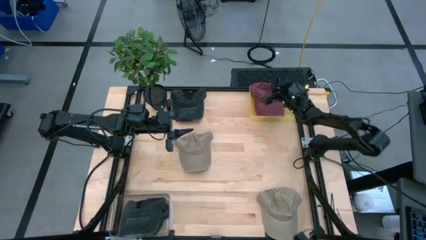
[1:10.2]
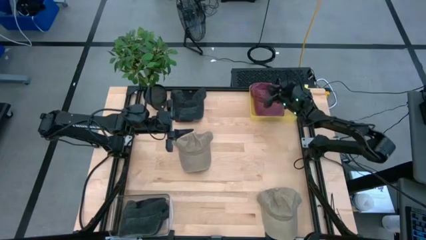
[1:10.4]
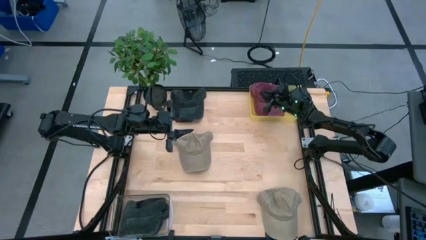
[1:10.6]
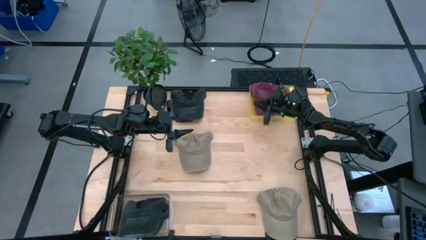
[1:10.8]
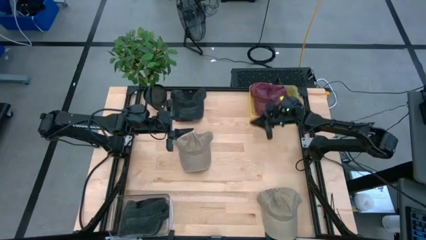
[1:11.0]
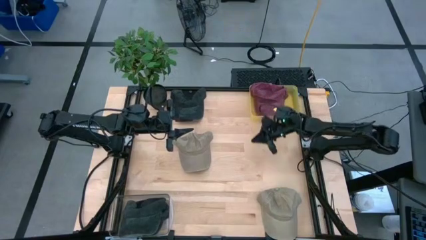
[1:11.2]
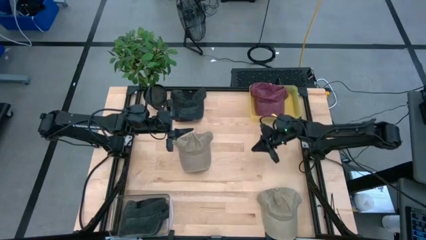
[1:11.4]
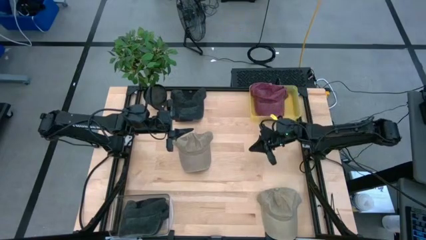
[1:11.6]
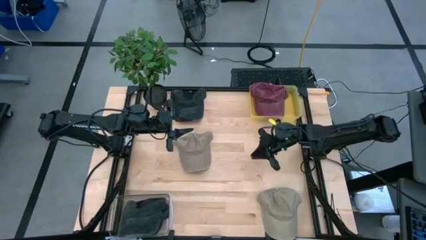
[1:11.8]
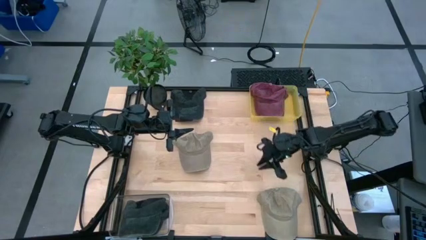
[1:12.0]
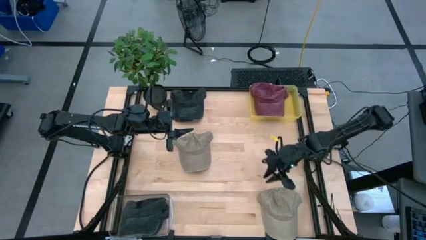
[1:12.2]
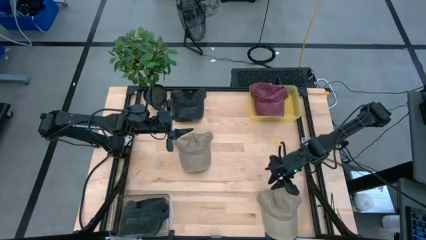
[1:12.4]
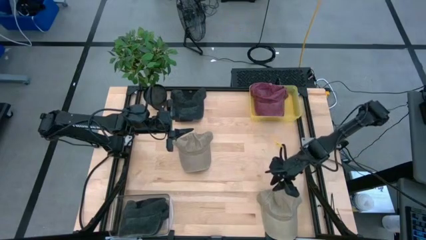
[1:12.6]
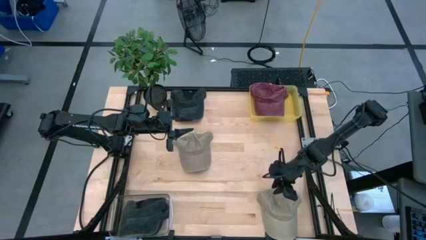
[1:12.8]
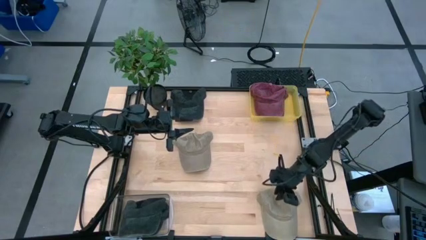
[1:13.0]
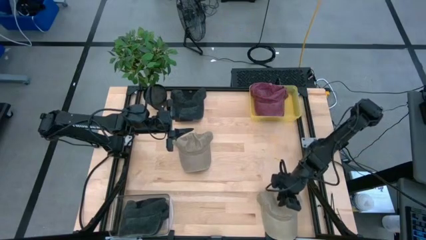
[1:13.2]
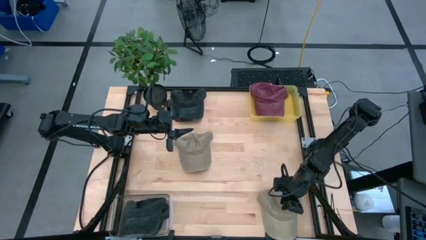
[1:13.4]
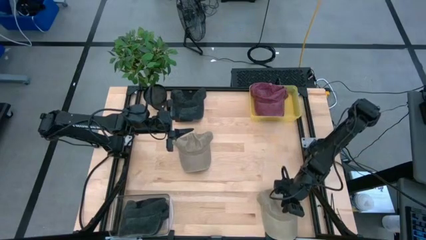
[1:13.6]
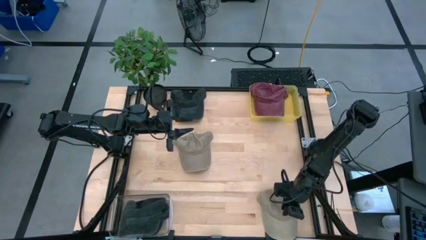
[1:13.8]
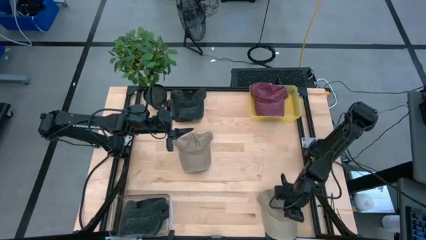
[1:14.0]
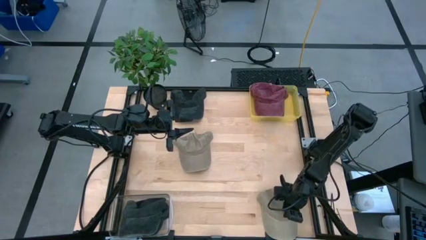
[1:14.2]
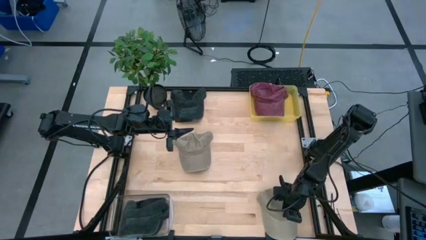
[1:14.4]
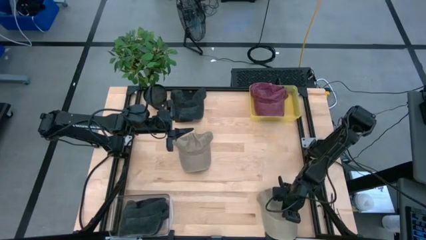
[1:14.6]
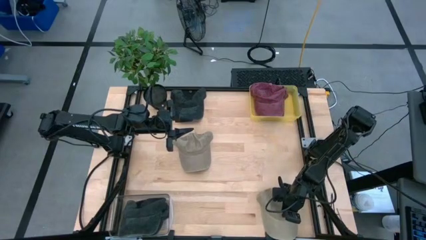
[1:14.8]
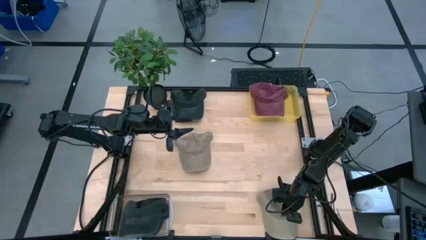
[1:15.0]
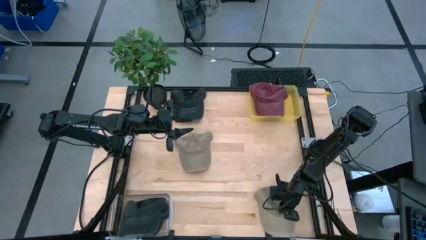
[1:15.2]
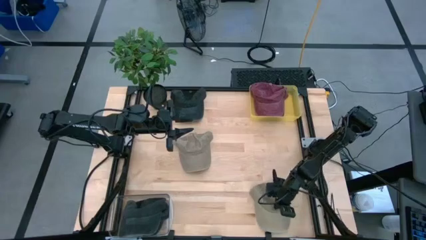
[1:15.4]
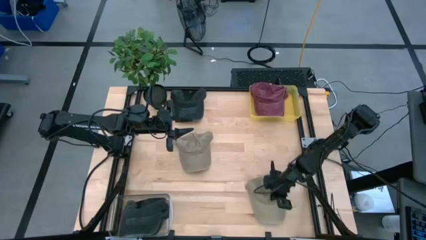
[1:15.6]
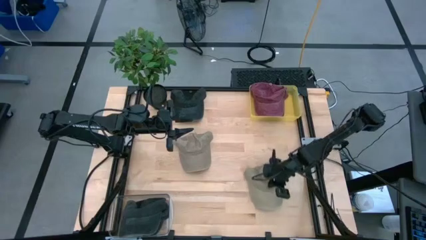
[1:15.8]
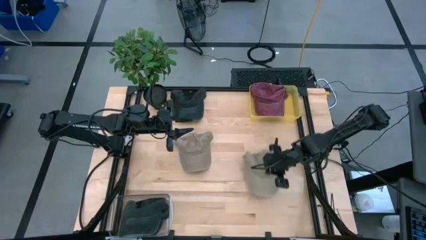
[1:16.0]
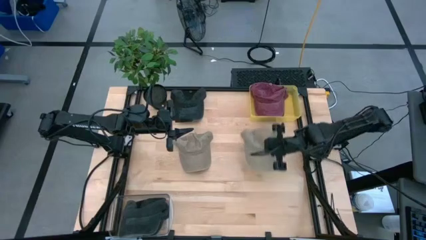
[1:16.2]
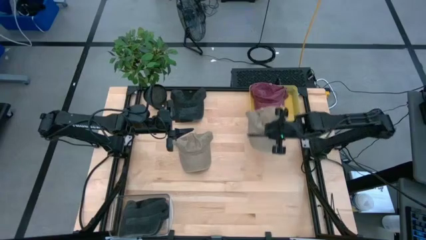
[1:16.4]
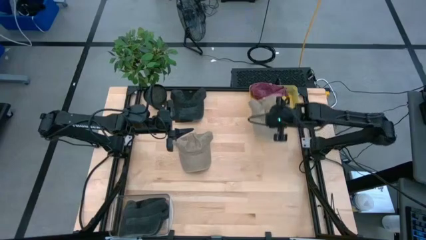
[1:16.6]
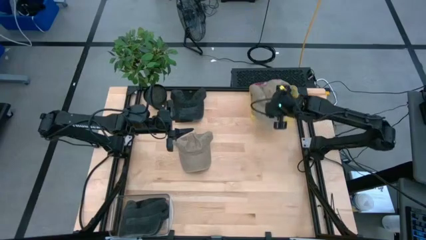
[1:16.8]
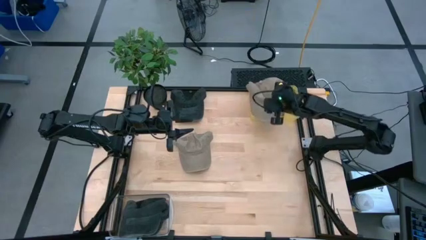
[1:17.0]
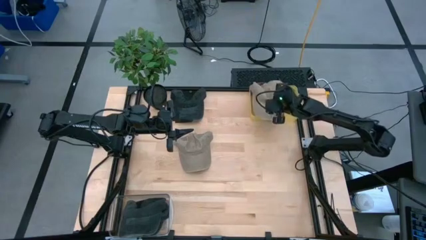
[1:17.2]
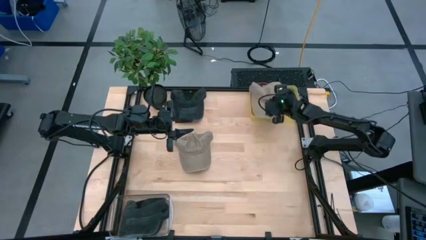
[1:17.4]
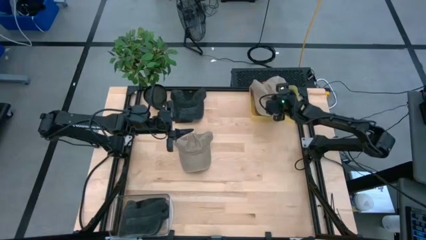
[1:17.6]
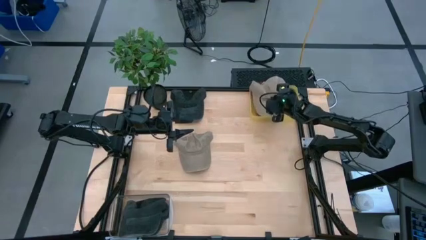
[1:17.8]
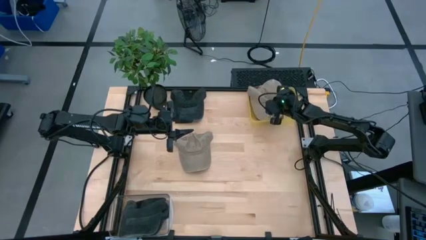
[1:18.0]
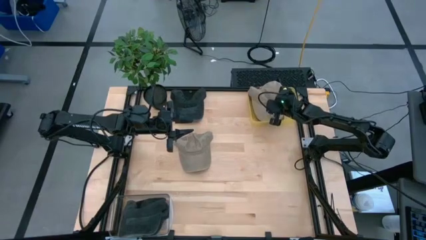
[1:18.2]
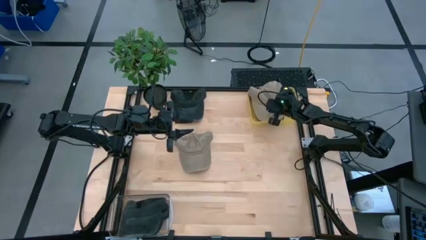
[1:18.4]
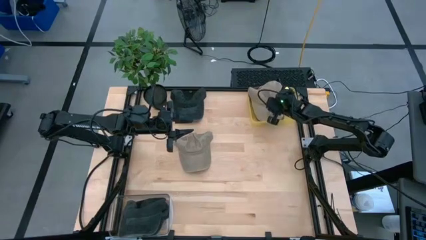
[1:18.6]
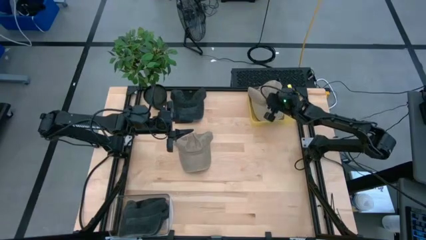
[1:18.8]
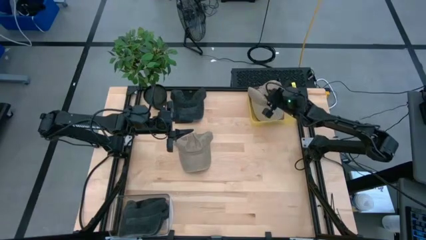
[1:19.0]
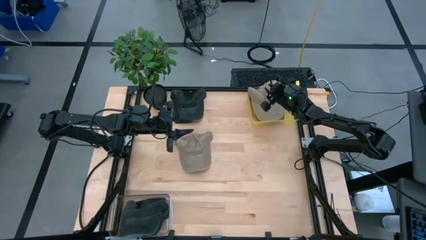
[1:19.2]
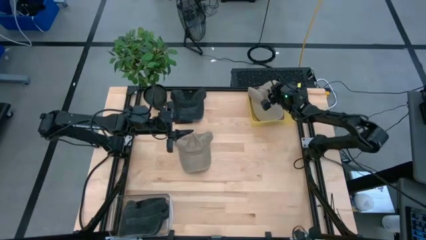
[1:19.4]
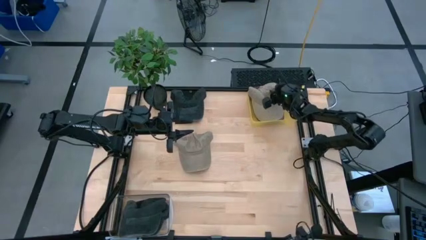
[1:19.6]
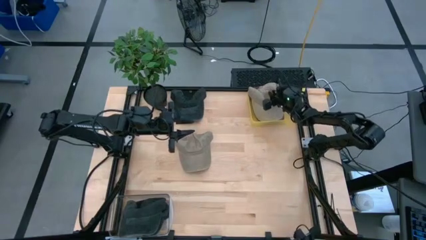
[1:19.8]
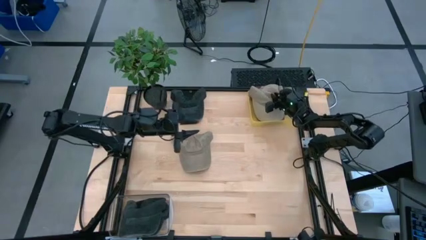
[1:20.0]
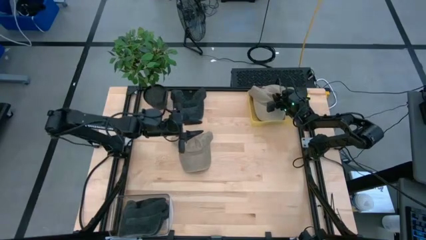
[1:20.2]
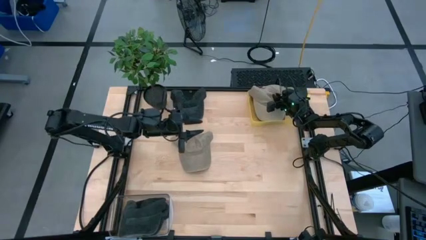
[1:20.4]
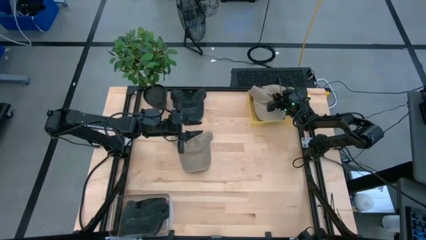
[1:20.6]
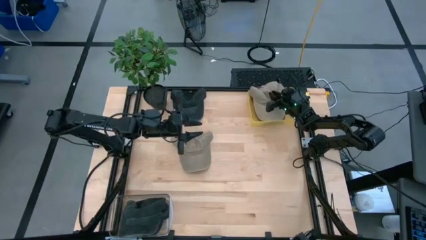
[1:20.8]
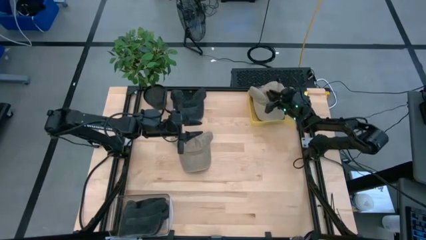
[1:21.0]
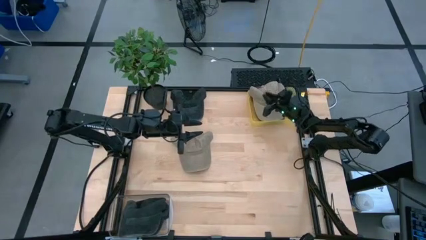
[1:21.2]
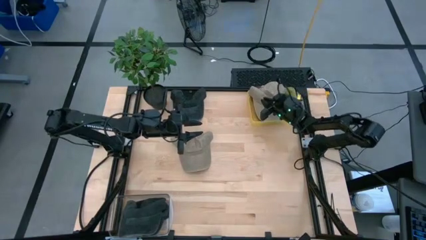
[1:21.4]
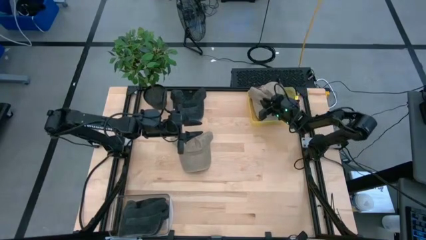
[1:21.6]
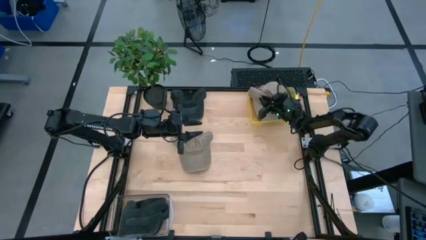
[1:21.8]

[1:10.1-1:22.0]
Task: Pick & Place hat
Put the bottom brown cap into the yellow bin

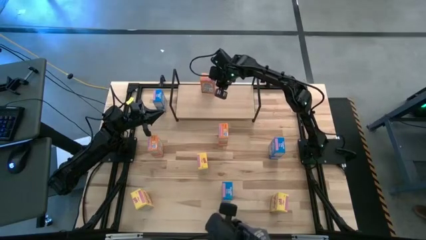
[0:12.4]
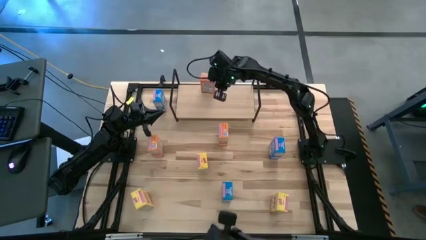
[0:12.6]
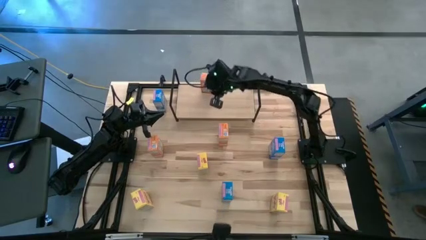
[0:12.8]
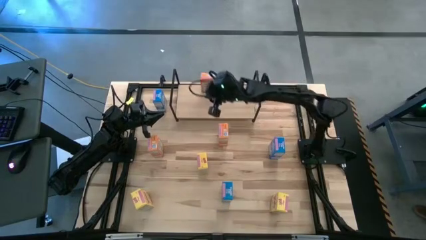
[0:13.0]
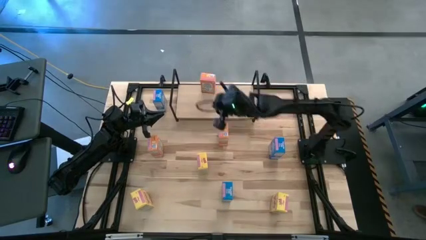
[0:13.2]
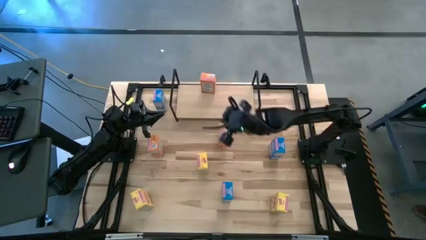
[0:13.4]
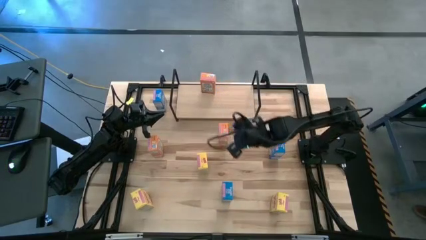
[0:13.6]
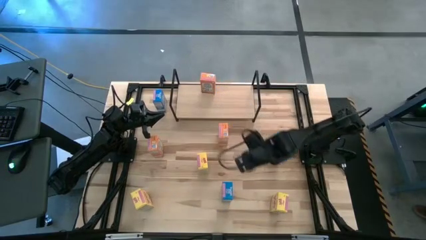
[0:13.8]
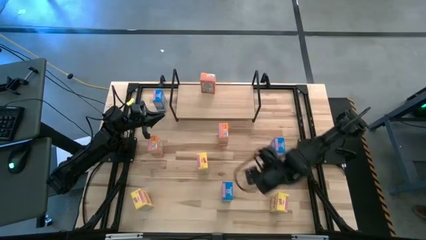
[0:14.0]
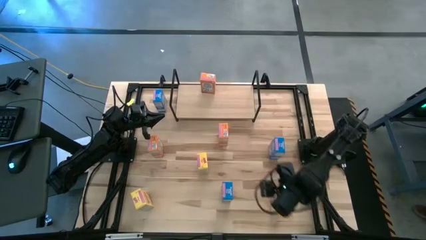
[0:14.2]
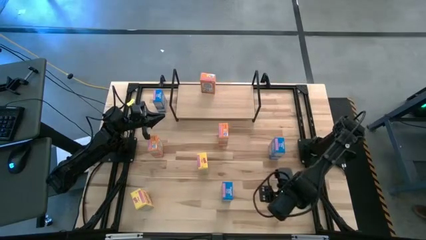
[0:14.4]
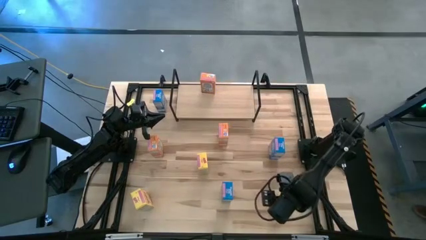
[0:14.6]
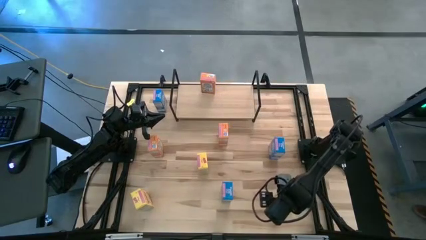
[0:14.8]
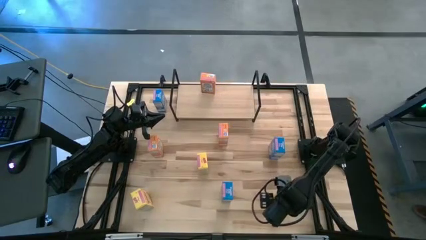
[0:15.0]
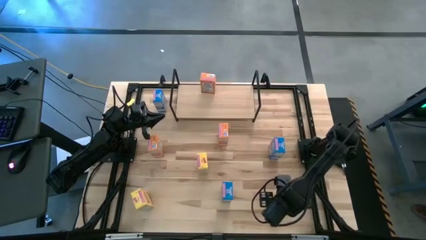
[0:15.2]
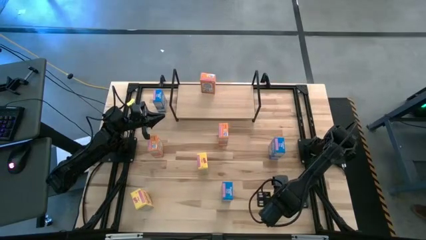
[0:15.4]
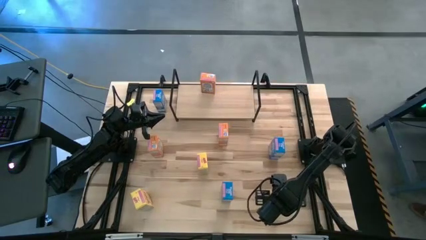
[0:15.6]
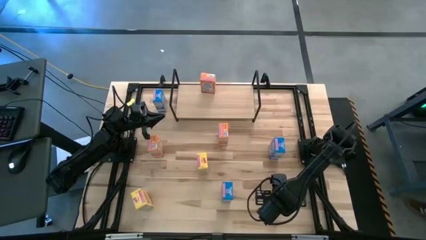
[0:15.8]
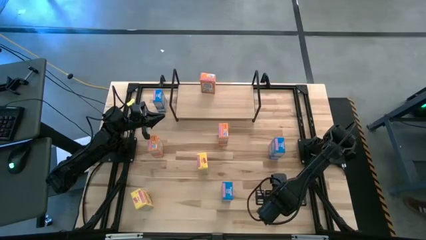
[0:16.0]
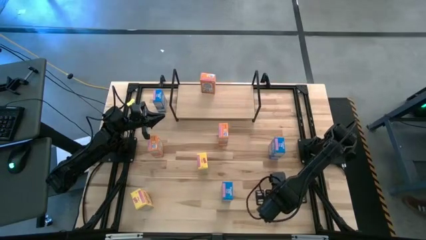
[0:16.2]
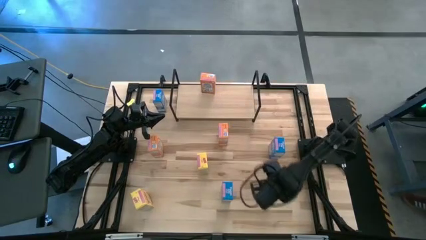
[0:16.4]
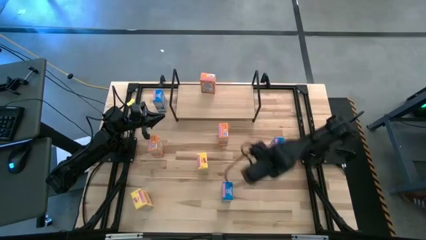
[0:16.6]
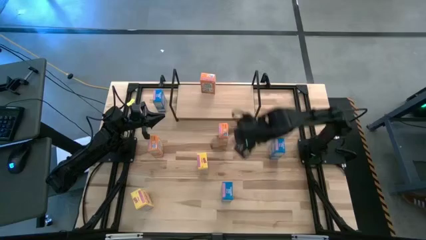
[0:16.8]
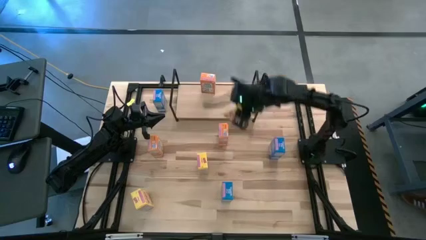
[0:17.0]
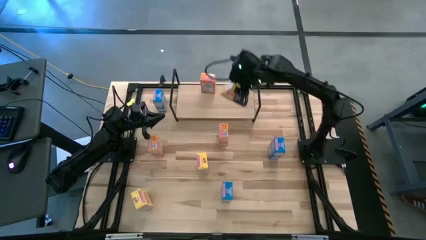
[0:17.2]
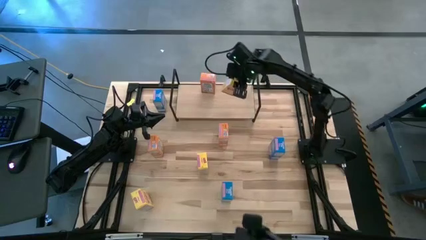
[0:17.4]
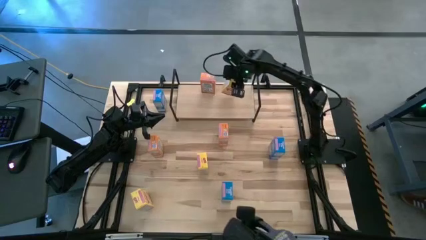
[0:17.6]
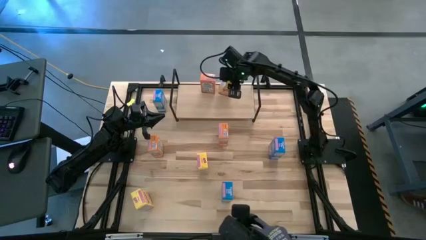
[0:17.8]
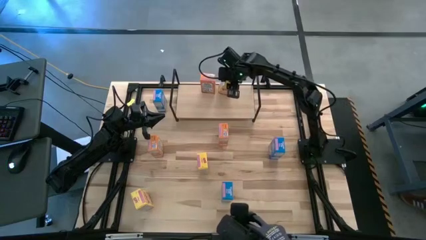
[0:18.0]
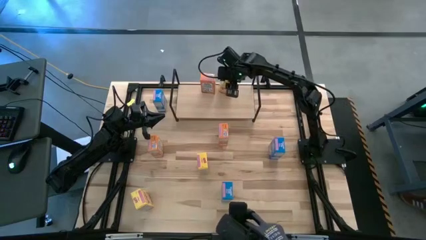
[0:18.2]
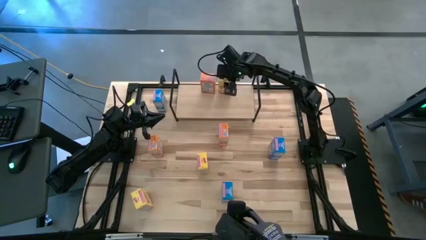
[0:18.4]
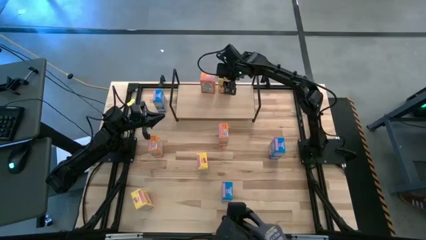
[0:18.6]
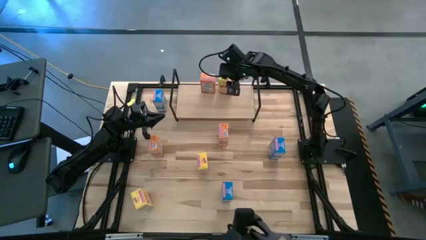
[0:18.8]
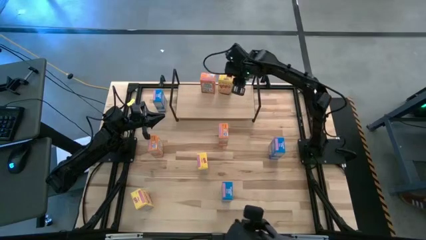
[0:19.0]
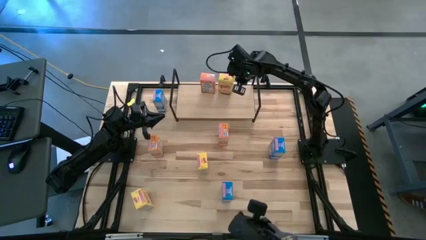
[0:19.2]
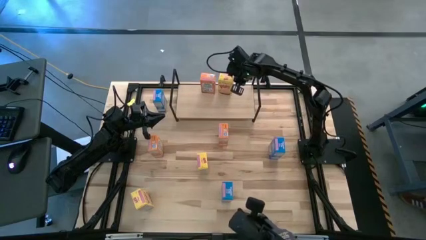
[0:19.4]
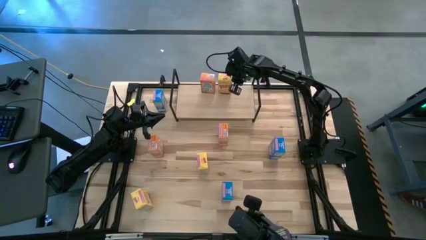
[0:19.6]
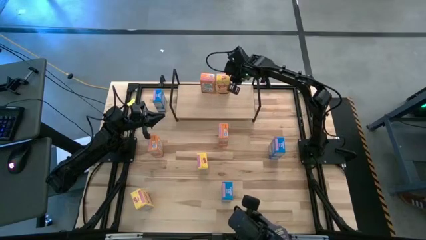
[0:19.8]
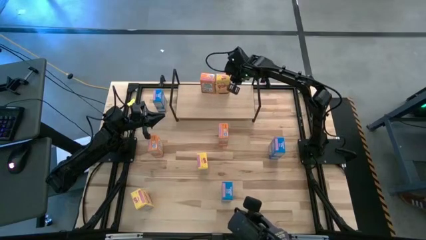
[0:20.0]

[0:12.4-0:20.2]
Task: Stack cereal on shelf
Put the bottom right yellow cereal box on the shelf
